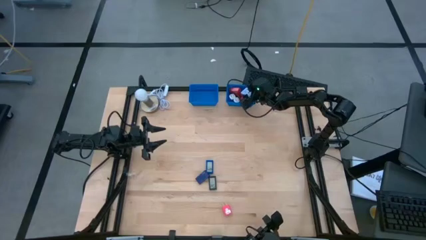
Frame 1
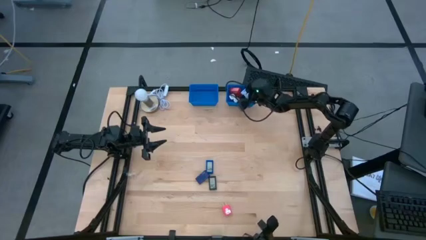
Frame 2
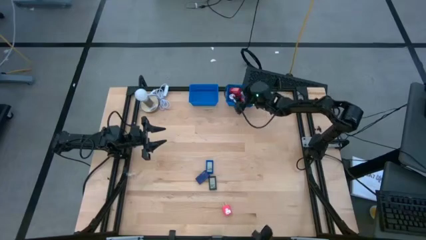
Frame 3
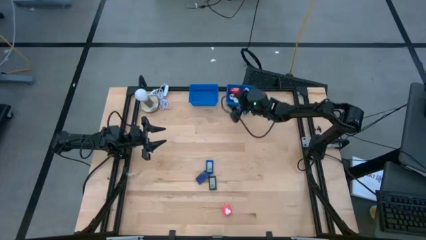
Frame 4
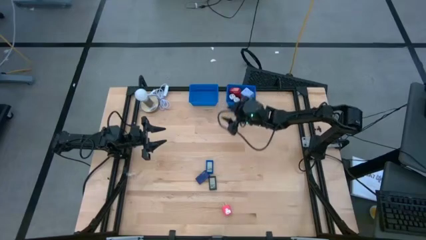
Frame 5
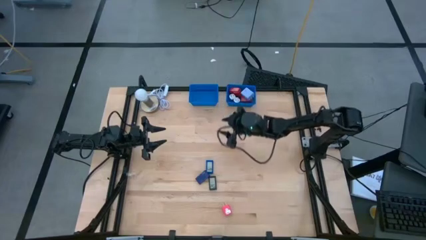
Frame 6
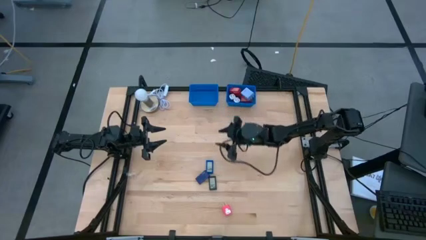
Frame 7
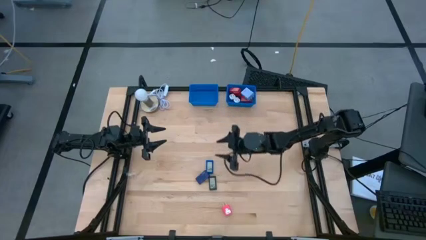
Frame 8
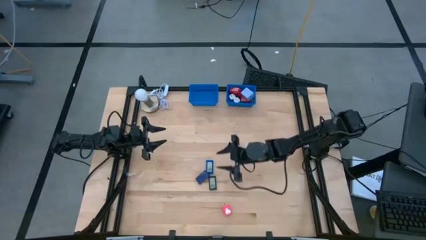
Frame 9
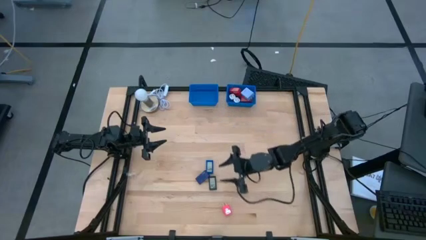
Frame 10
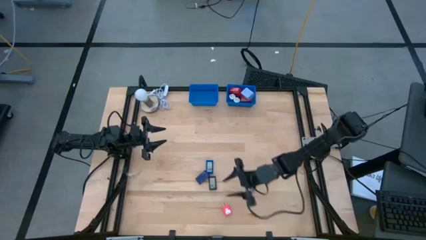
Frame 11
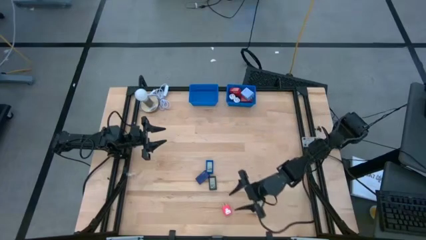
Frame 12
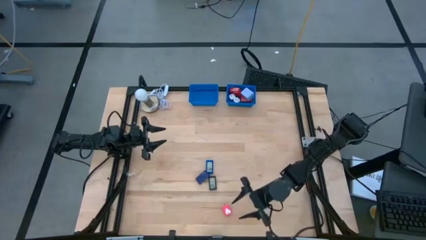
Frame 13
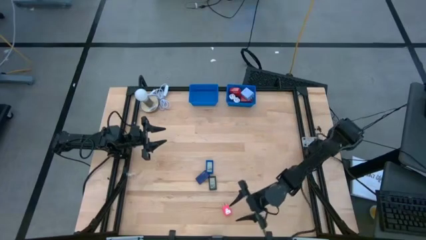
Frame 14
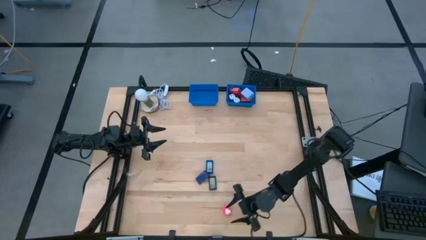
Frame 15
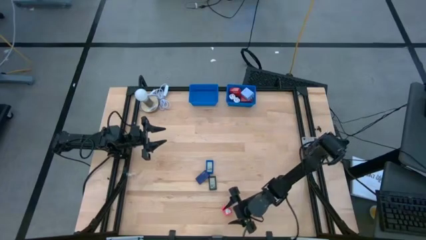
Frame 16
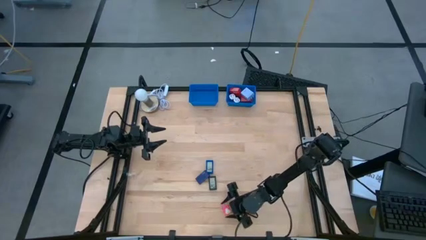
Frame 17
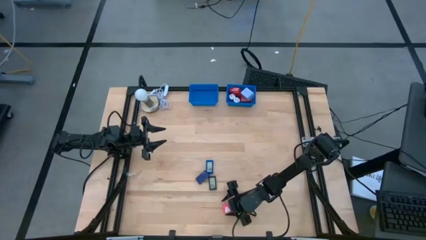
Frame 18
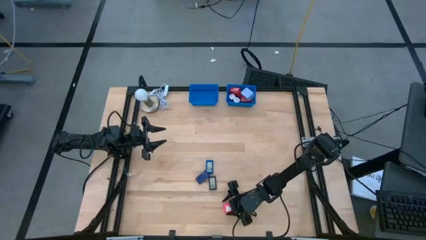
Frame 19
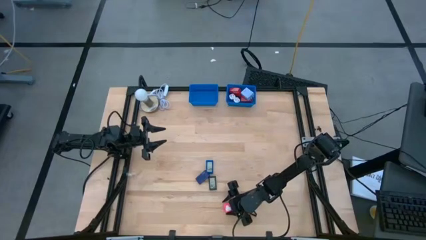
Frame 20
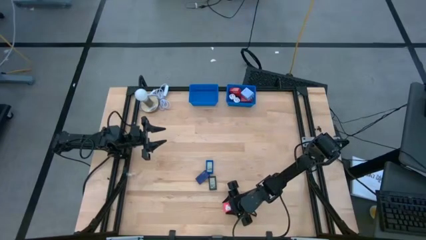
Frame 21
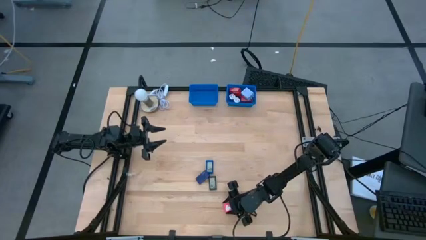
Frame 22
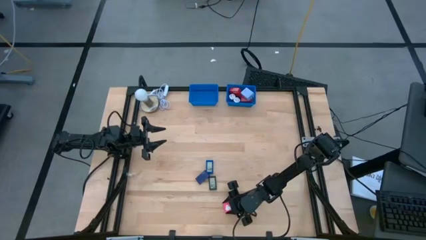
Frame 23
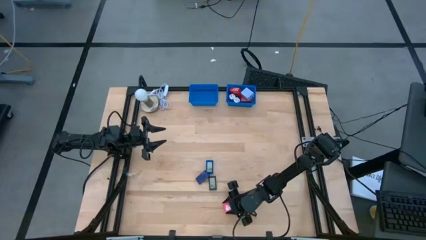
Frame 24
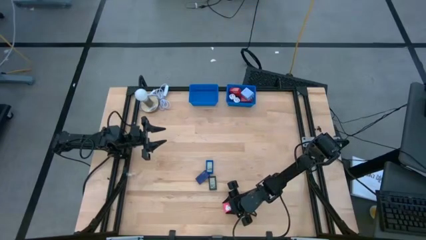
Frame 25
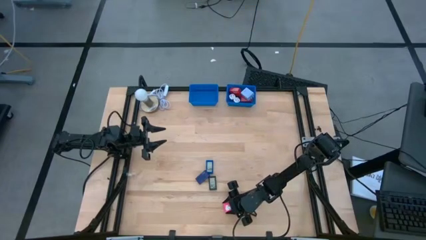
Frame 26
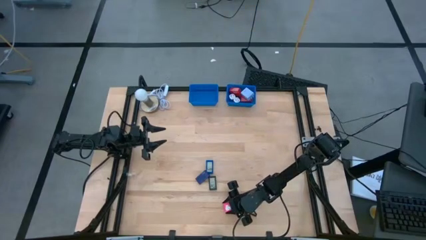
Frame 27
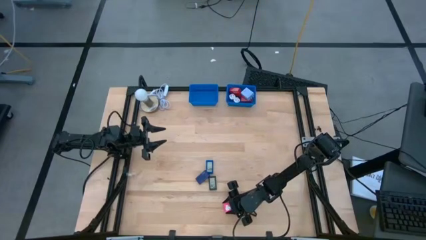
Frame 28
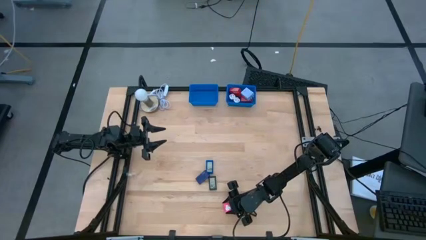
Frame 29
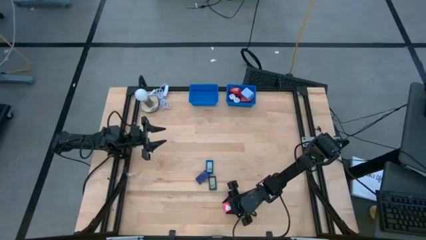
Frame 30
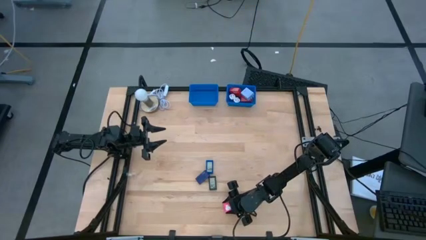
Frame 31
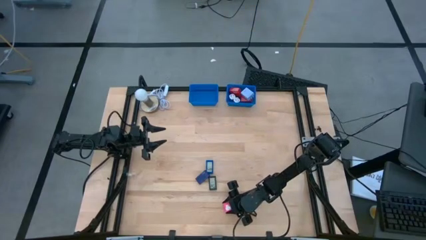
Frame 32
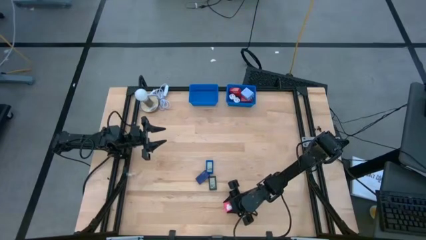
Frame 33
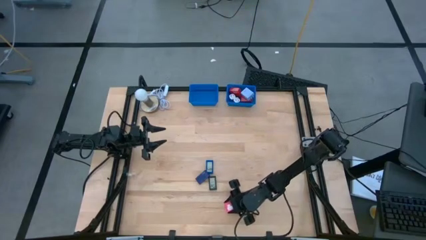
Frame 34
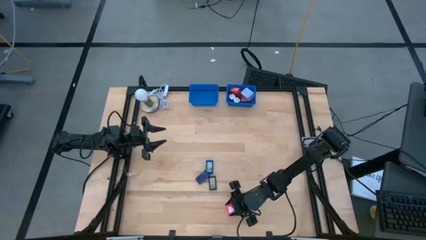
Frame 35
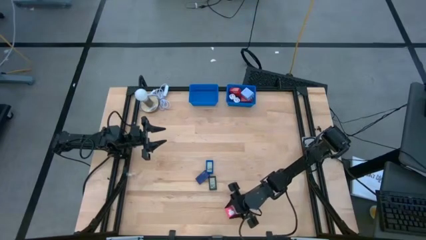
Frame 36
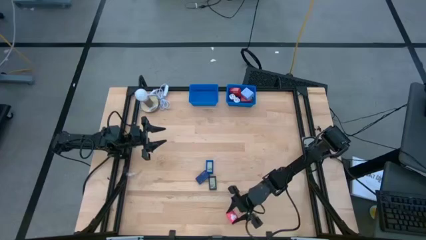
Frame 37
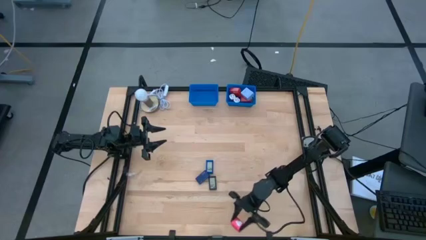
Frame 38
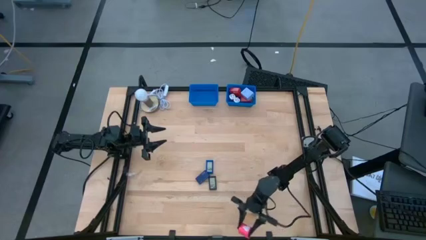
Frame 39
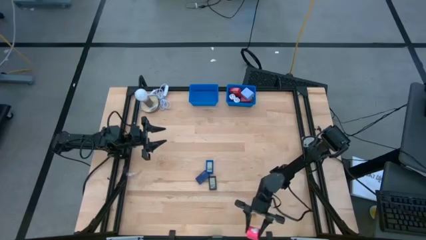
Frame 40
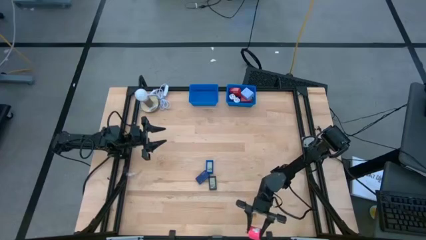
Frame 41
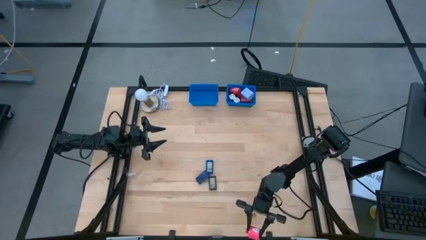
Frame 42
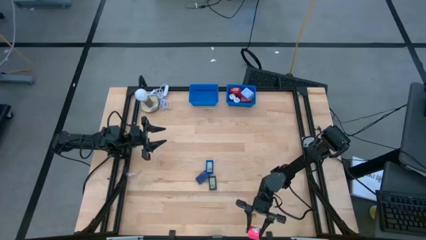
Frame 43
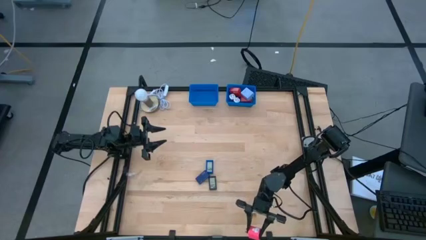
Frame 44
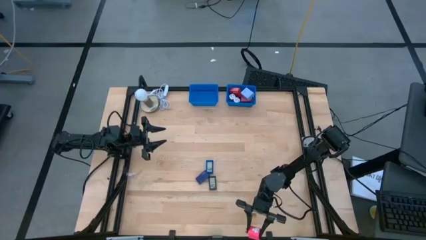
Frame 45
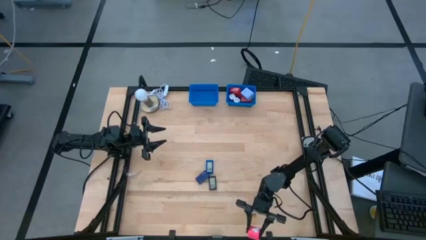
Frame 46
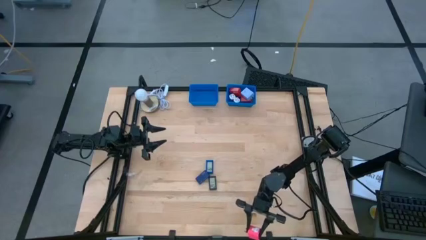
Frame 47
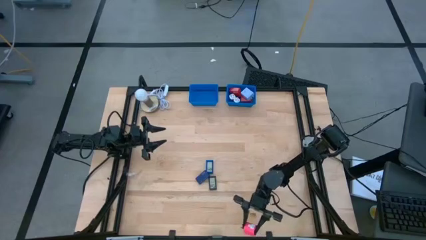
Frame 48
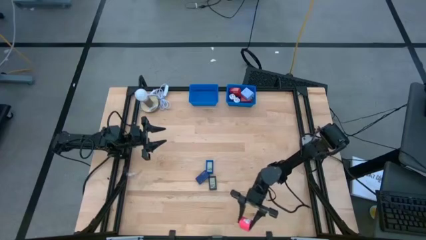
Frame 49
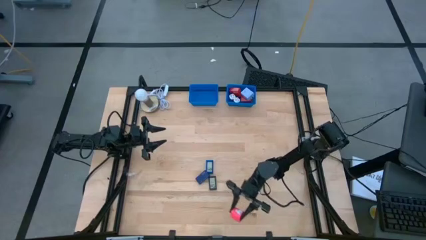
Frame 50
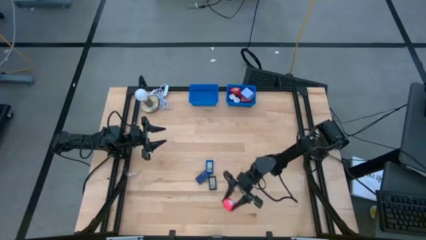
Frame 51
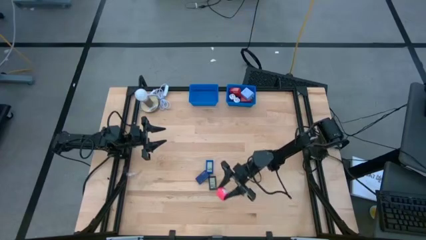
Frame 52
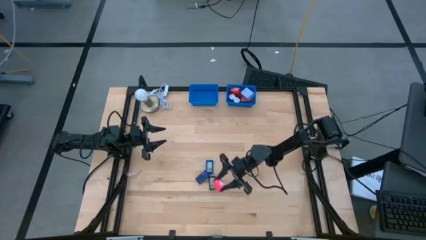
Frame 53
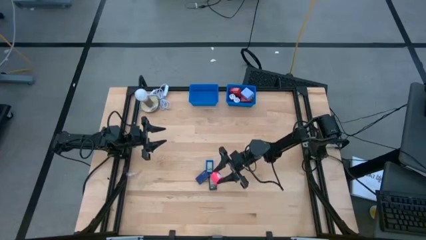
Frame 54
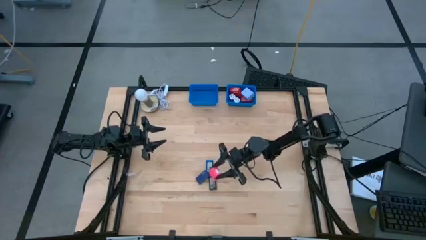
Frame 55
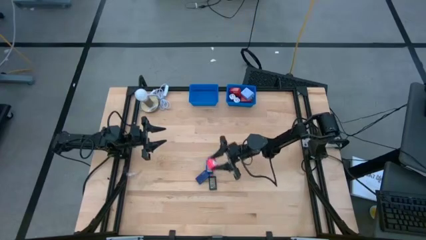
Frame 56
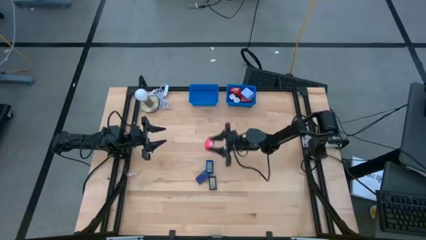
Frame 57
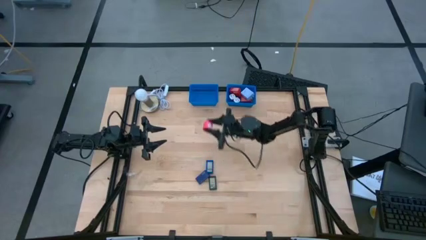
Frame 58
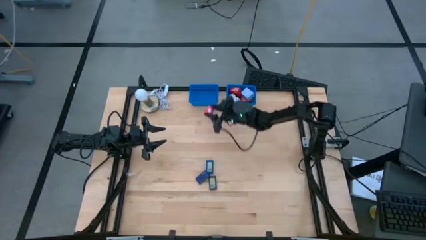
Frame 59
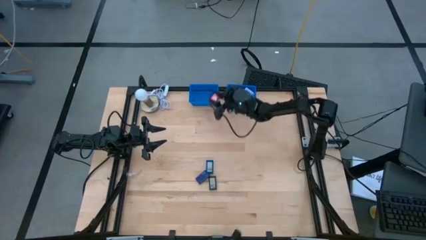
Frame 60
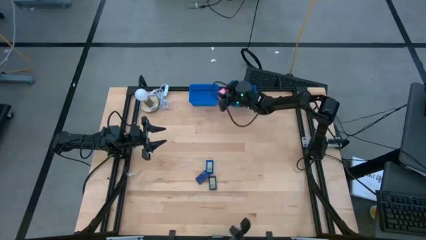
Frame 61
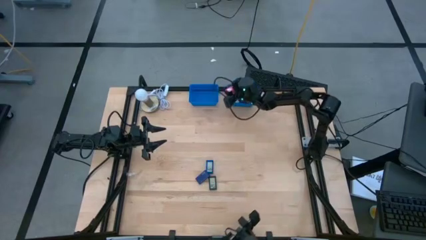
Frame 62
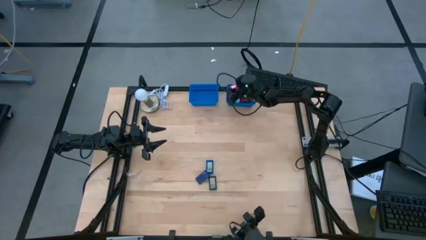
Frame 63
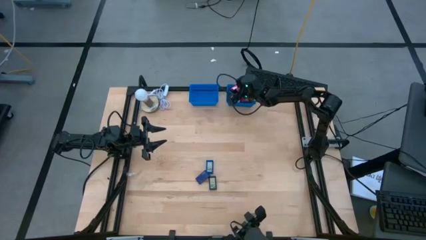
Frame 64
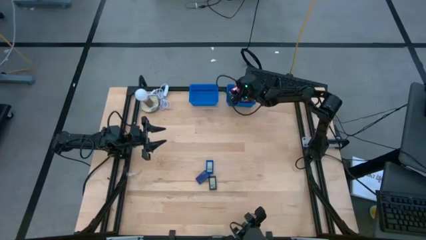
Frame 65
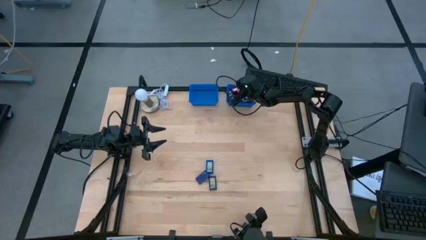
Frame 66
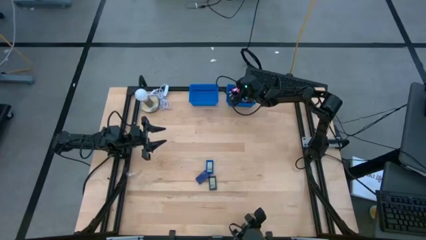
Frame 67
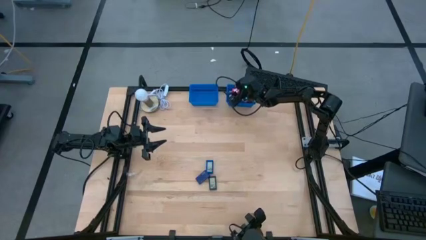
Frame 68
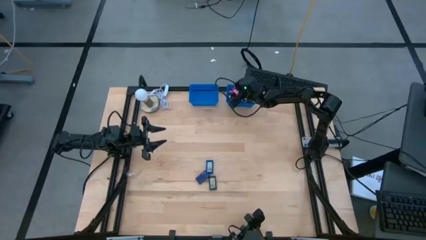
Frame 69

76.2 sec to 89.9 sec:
Task: Pick & Place Office items
Put the pink charger adapter into the right blue bin
